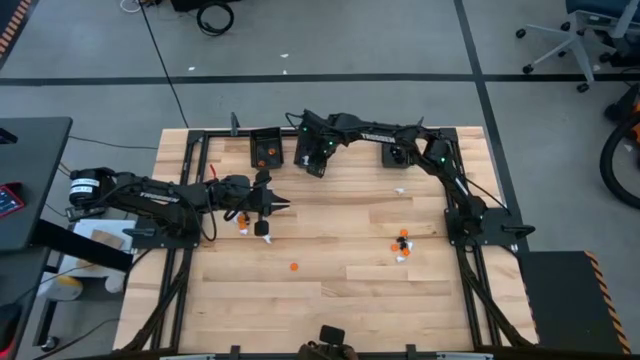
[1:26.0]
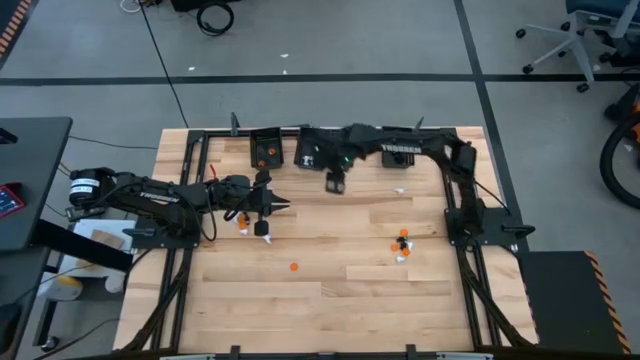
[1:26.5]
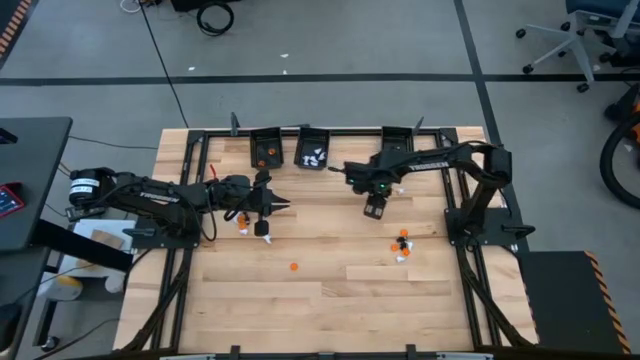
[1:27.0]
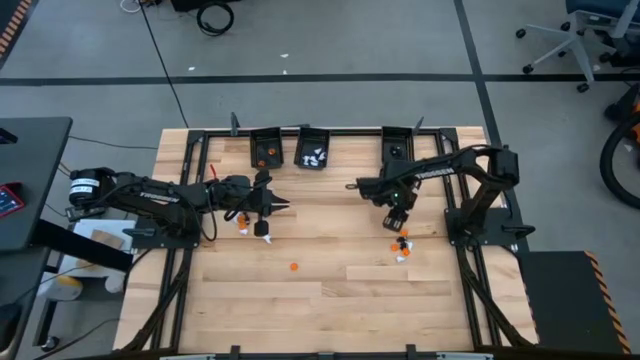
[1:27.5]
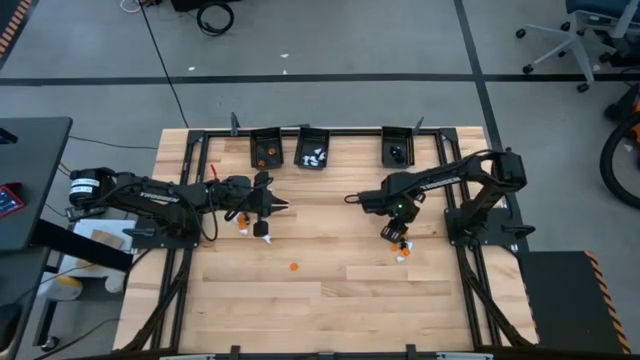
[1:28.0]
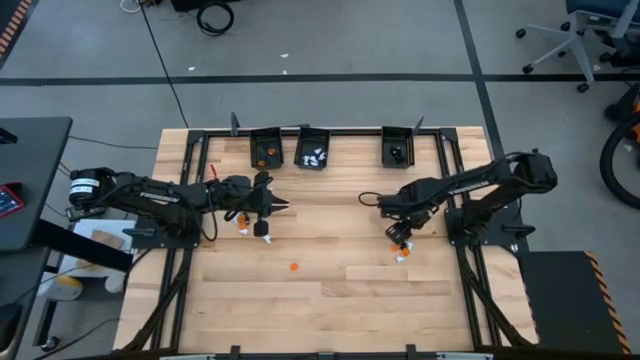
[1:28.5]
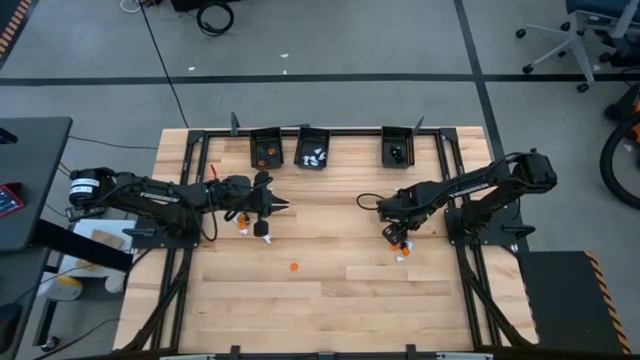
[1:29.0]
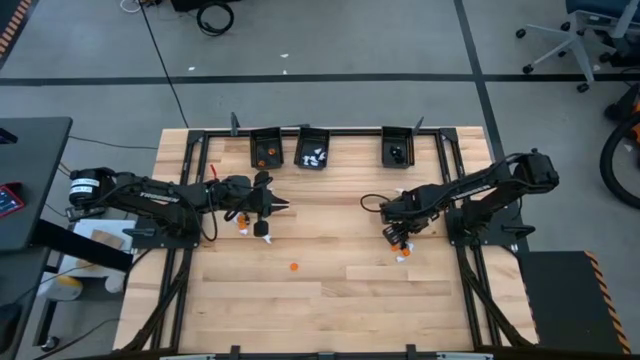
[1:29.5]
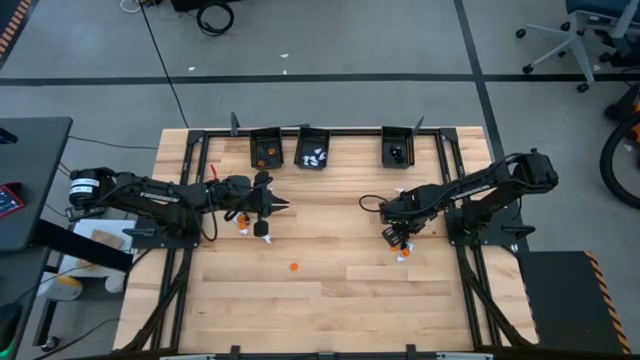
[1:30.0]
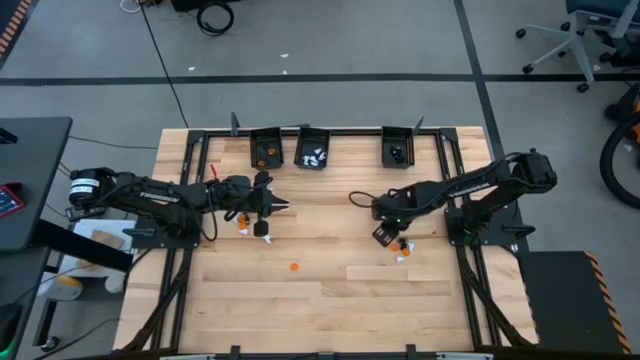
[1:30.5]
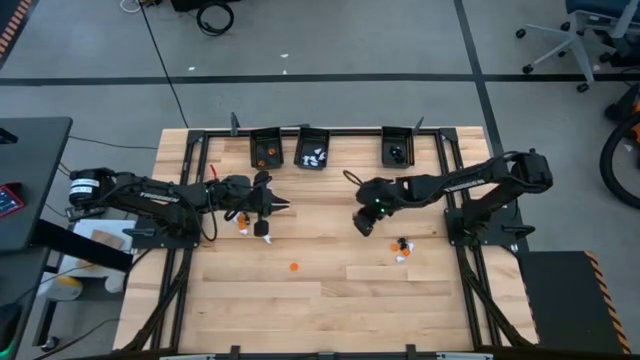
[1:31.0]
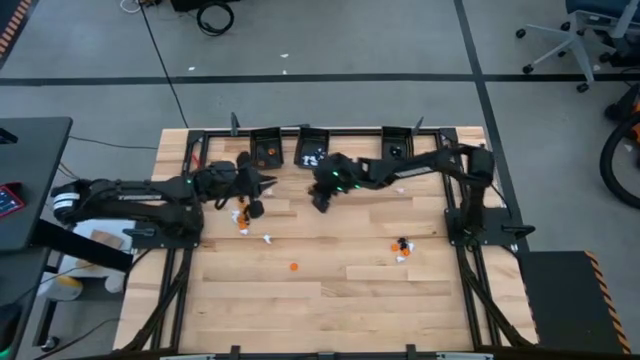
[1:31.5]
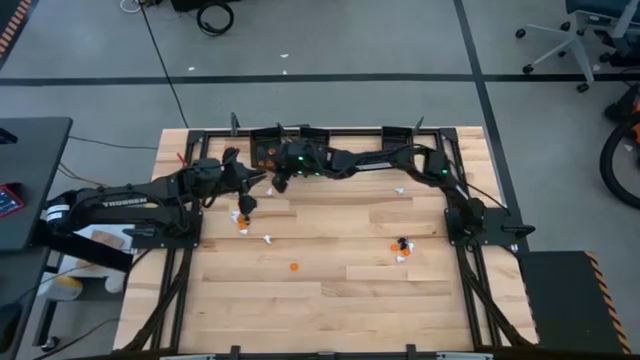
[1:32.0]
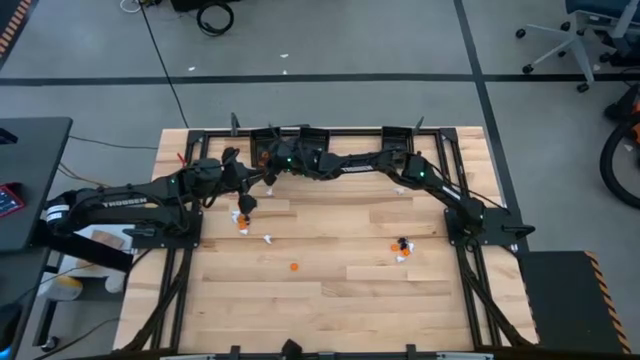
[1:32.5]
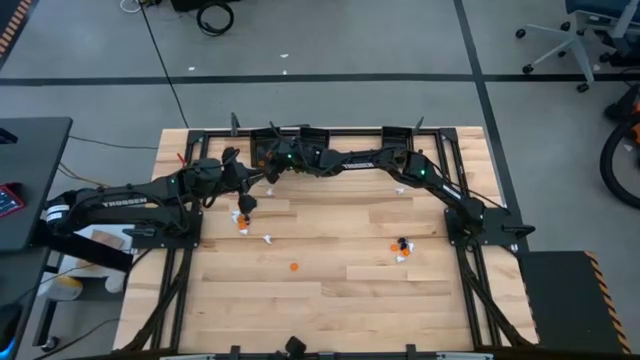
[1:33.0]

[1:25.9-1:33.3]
Task: Sort Halloween decoration
Put the orange pumpkin toy into the left black bin

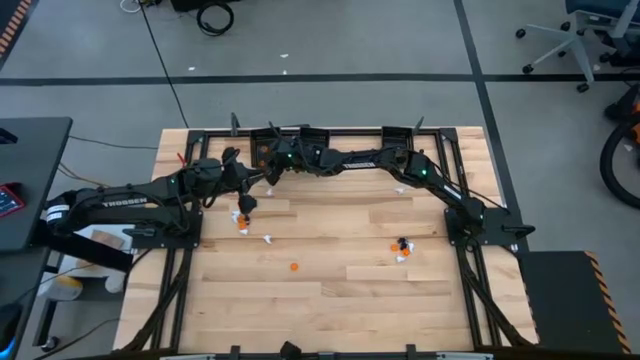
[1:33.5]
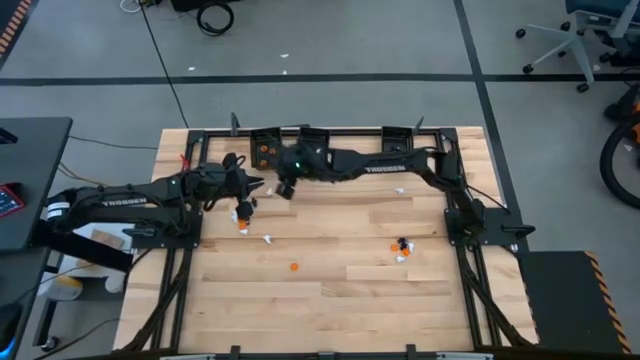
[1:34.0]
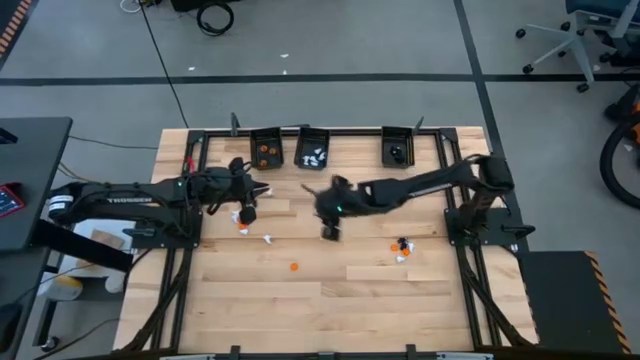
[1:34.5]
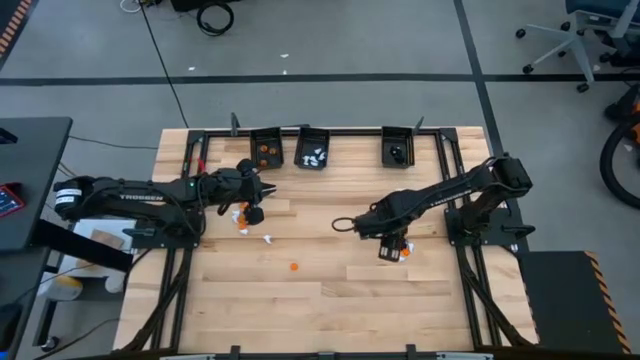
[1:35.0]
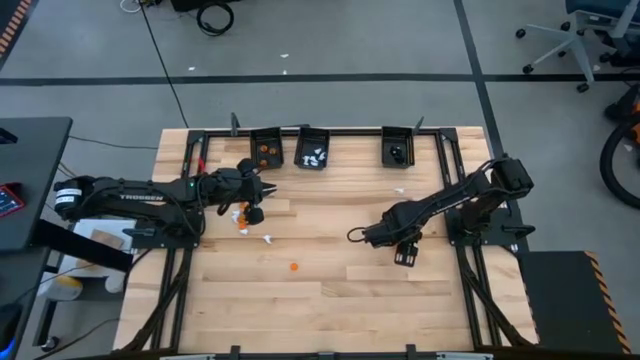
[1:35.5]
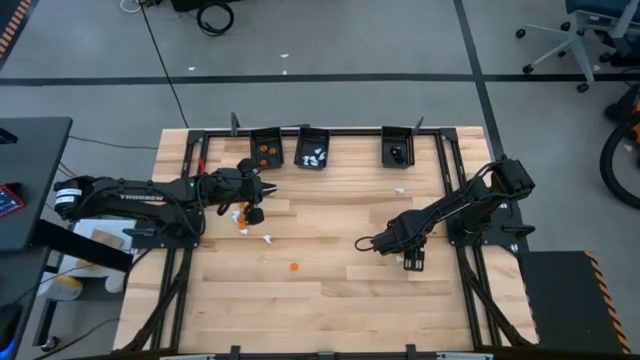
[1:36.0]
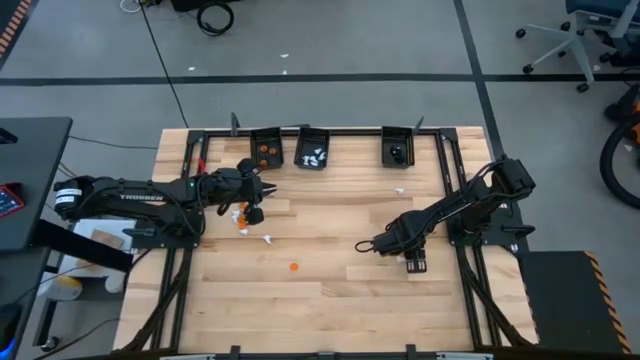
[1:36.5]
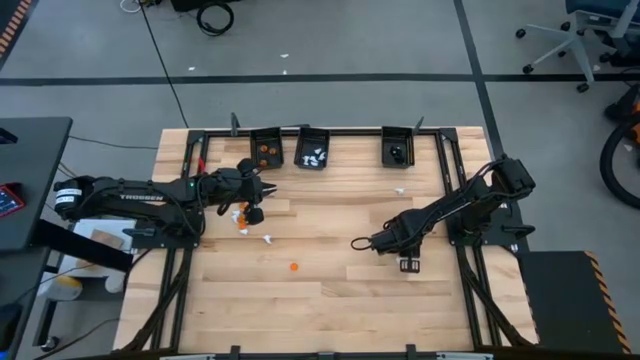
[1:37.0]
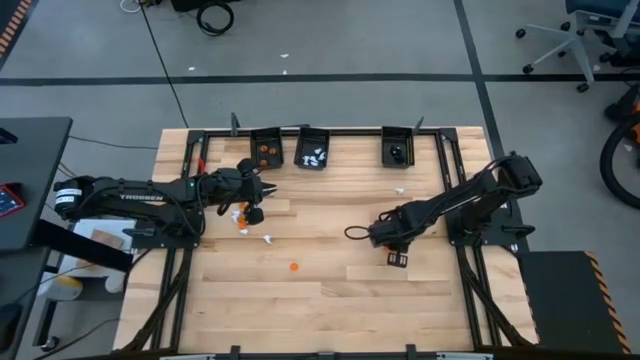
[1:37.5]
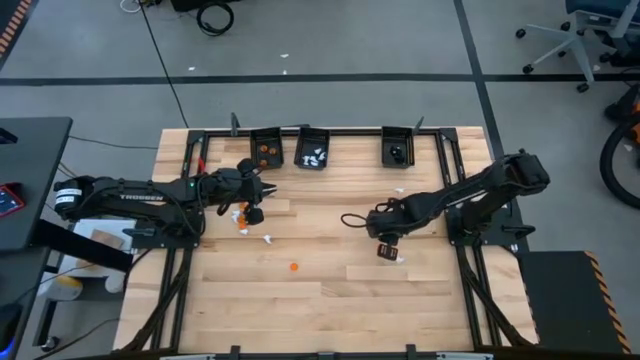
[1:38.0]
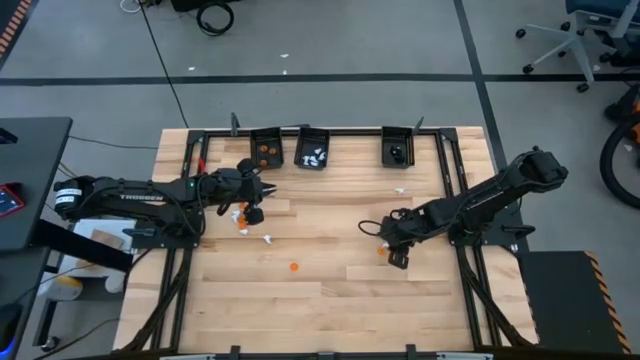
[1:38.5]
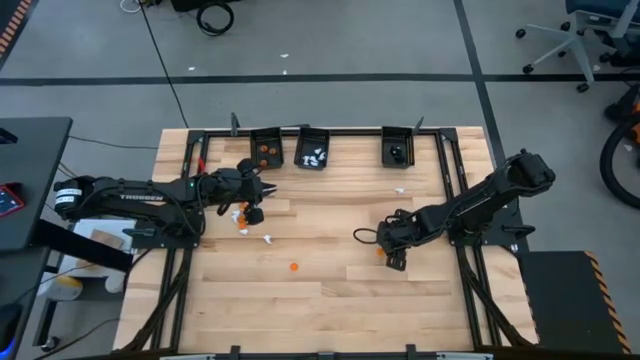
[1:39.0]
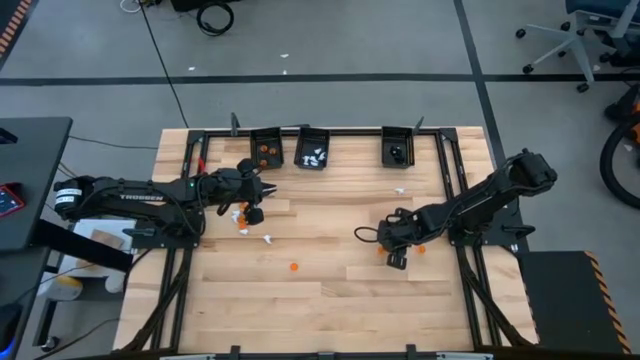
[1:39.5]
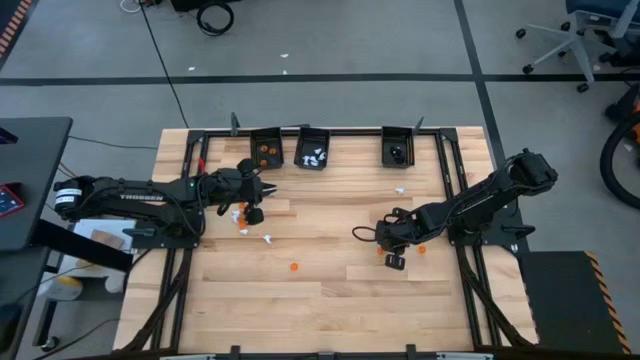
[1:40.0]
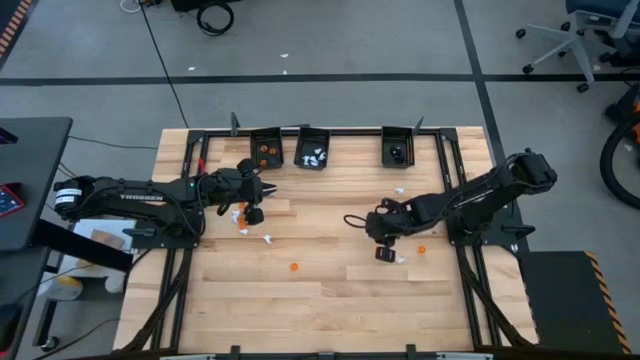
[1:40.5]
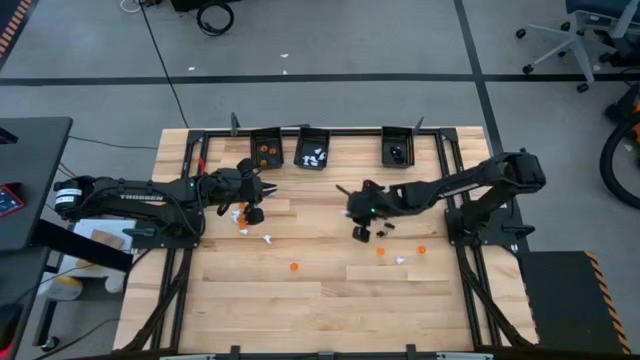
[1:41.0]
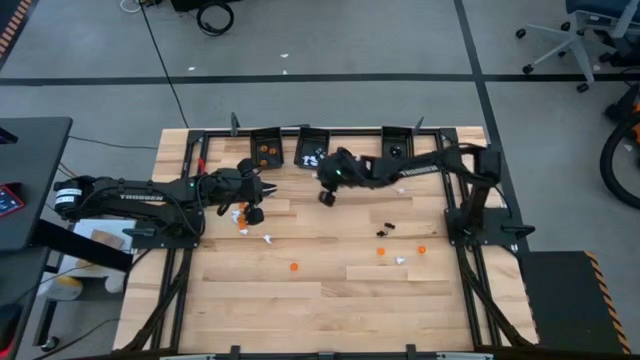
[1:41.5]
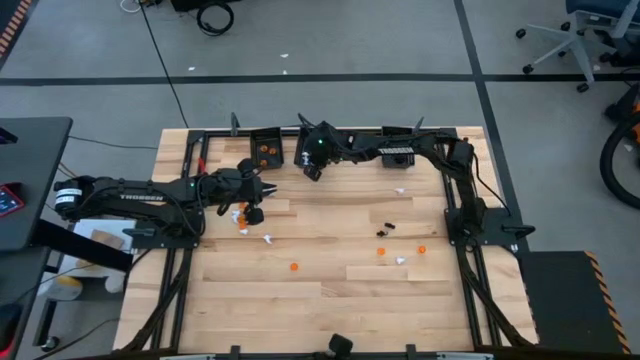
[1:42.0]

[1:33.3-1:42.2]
Put the white ghost toy into the middle black bin

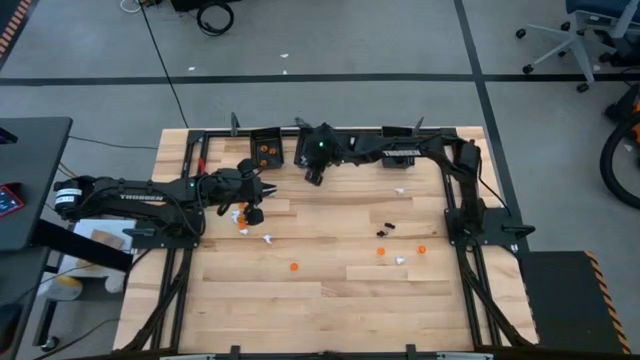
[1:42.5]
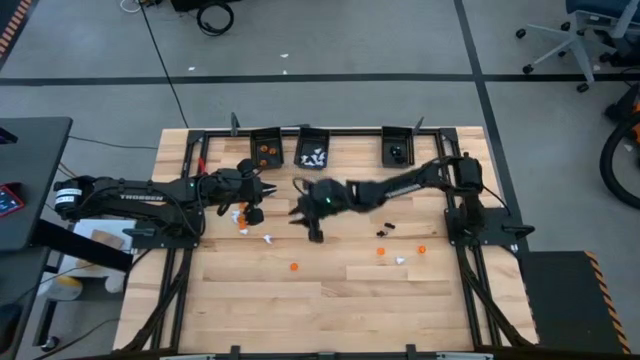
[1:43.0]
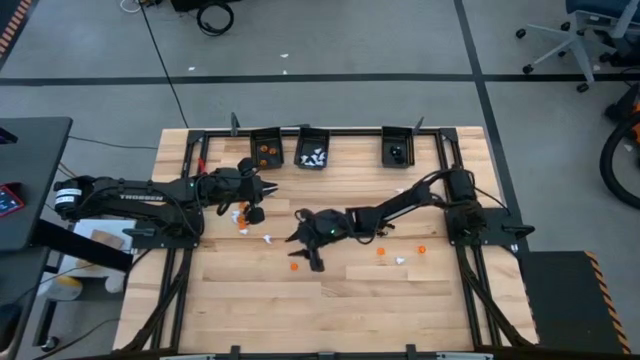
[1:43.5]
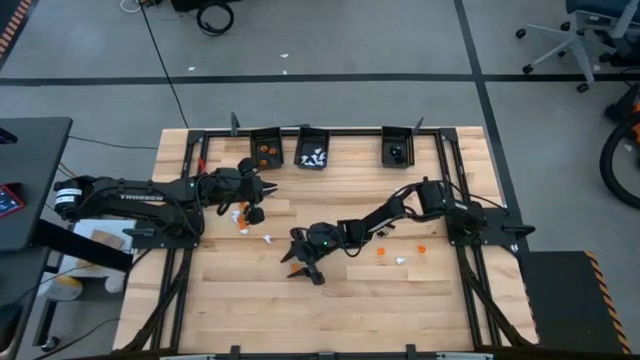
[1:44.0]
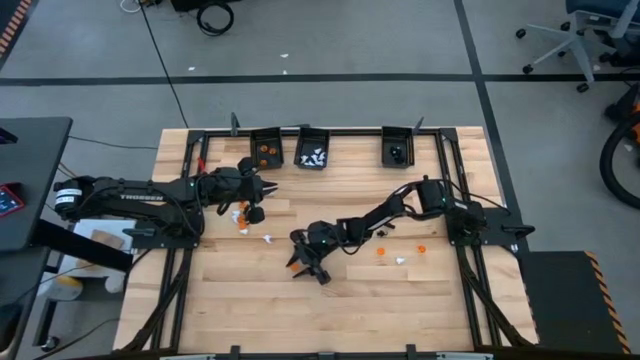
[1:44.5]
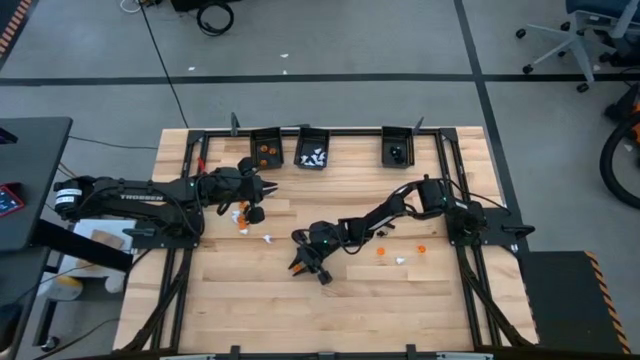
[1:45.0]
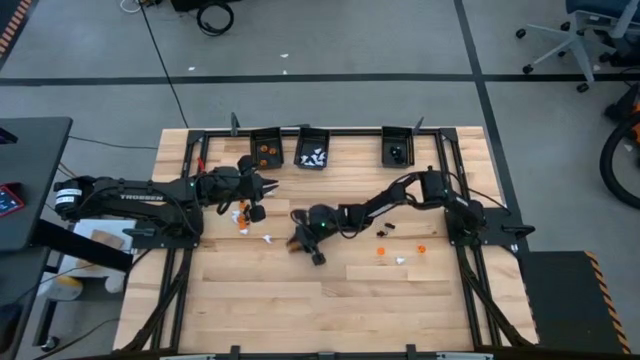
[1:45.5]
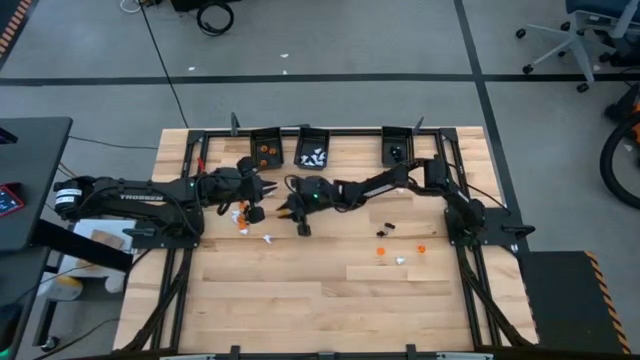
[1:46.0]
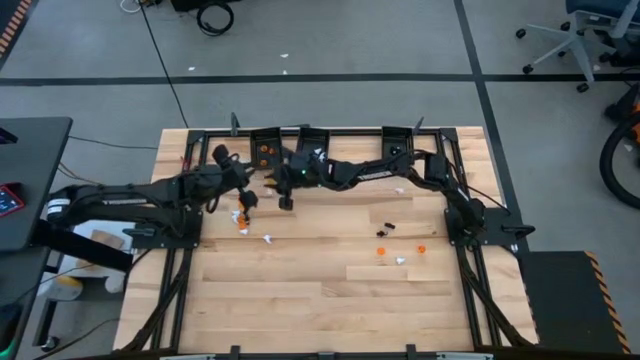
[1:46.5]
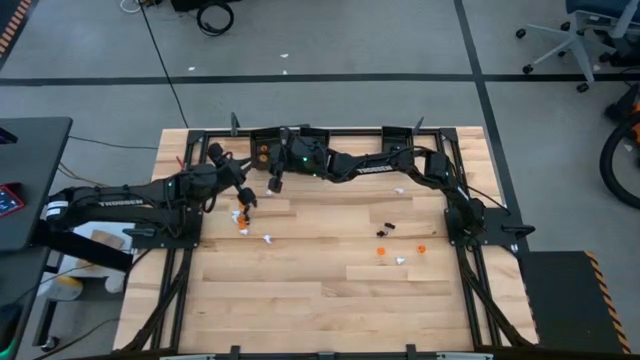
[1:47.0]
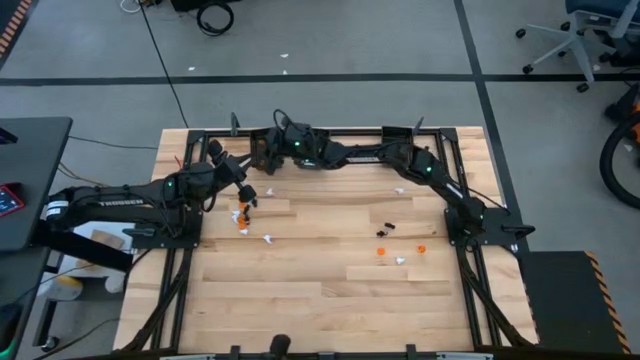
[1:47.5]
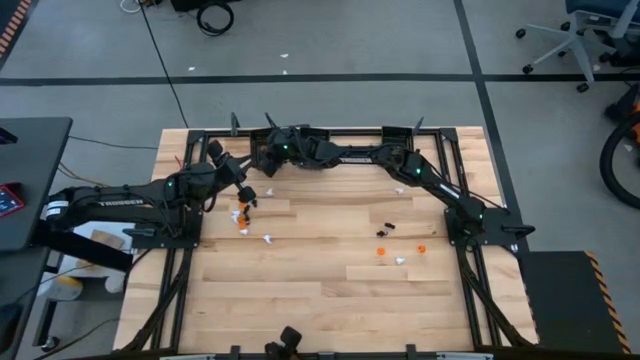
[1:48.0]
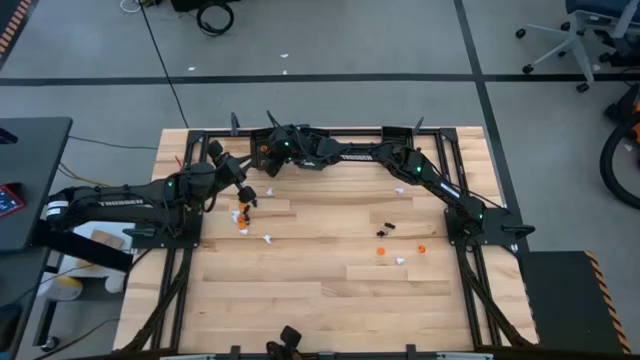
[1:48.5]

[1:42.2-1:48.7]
Put the orange pumpkin toy into the left black bin
